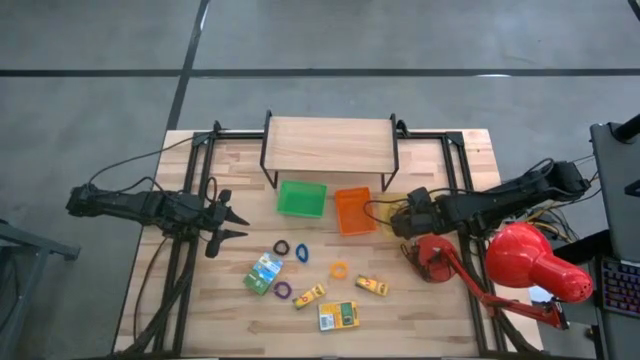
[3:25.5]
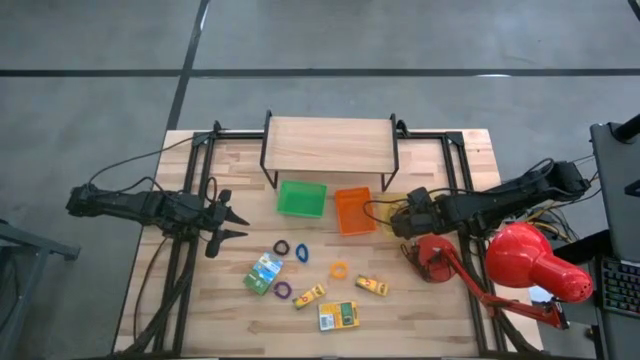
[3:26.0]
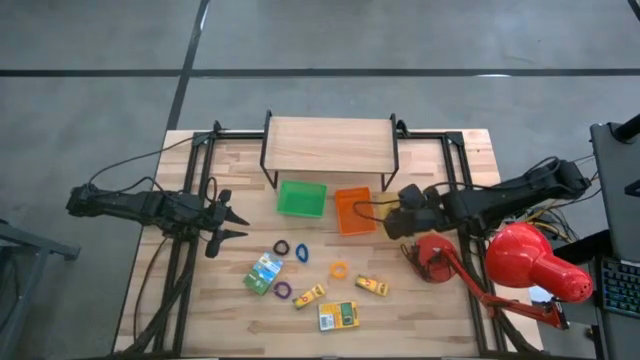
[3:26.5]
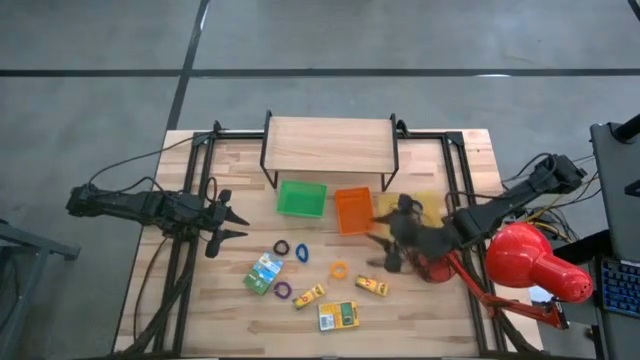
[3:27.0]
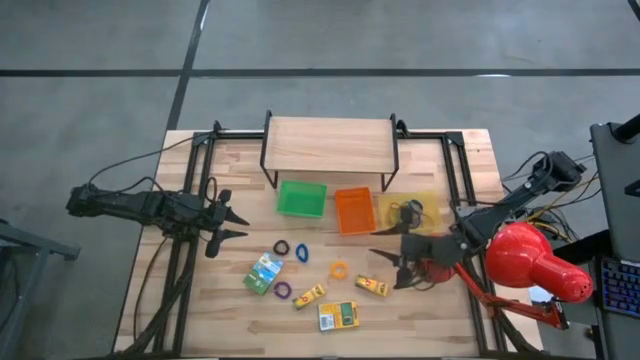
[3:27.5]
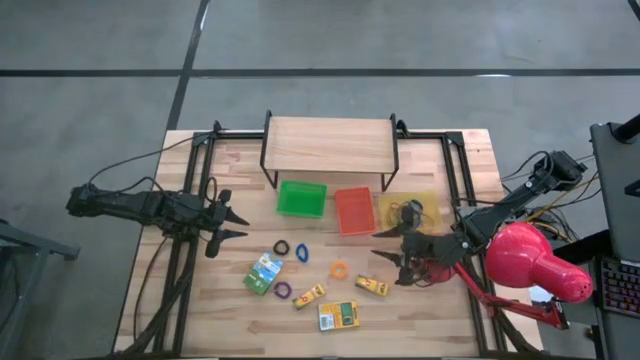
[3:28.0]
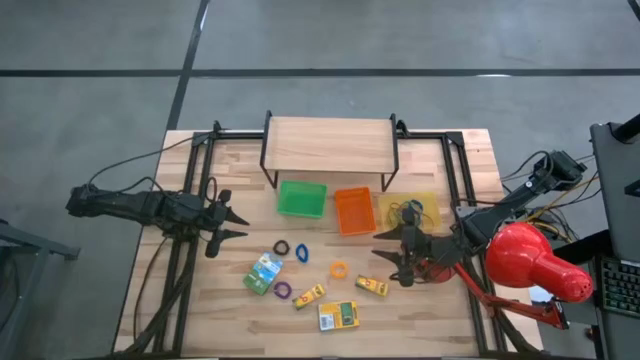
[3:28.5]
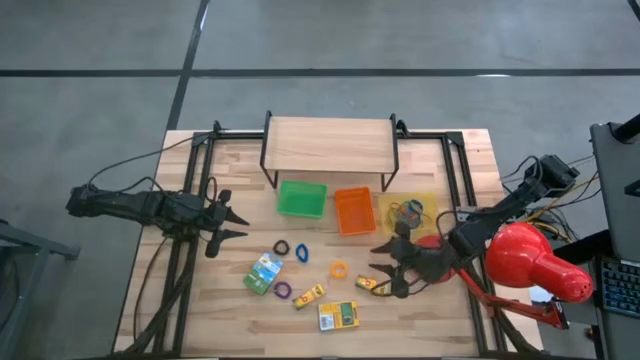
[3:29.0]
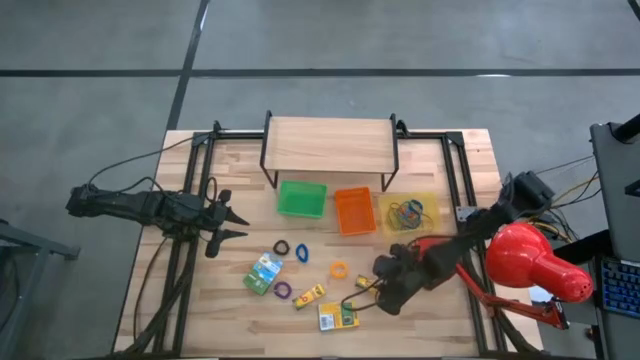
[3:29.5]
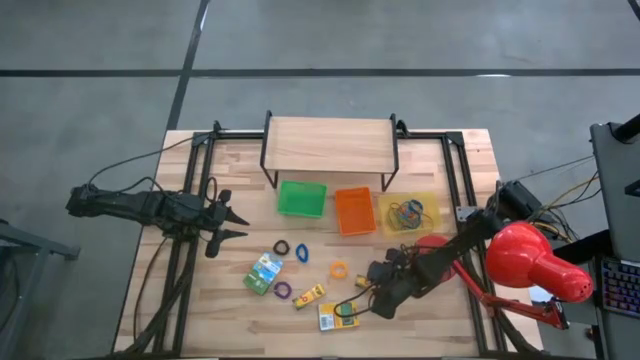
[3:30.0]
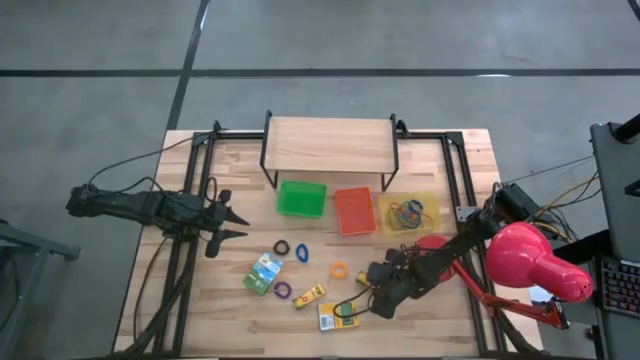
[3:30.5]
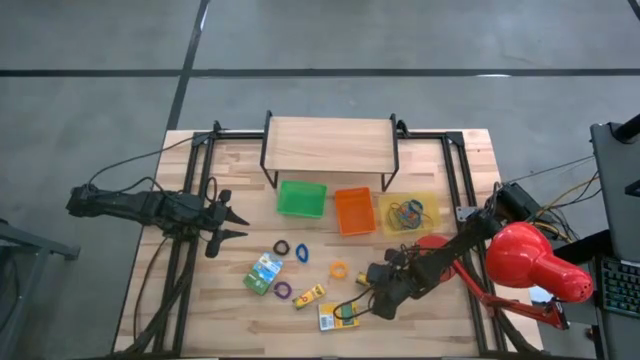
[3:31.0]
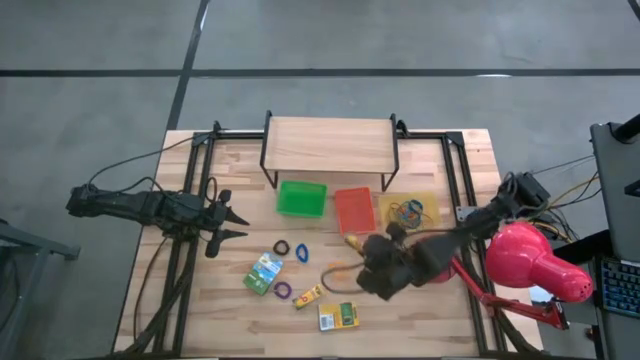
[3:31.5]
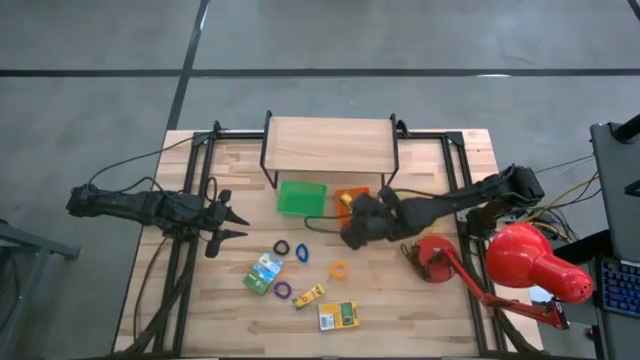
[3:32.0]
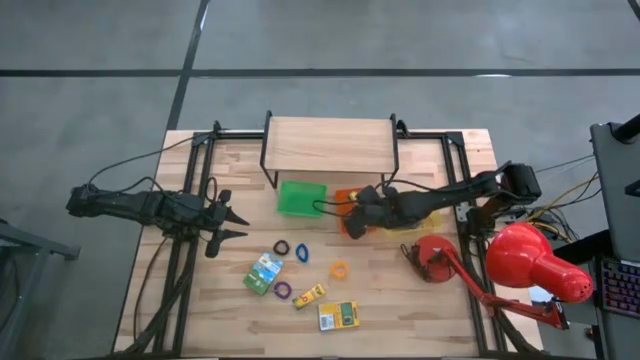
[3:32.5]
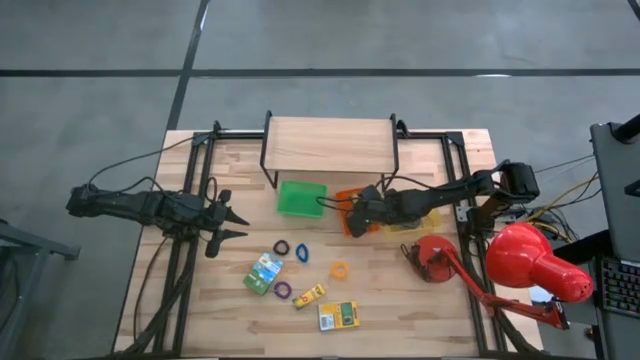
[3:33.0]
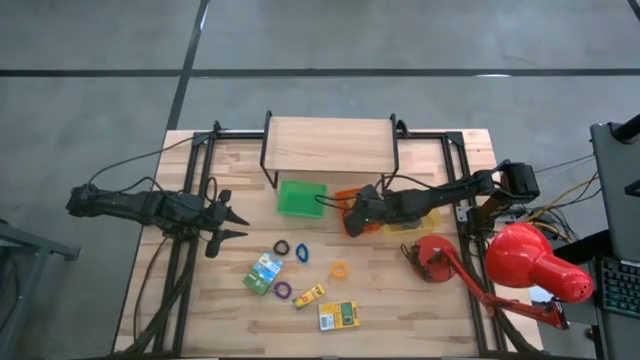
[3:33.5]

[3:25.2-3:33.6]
Task: Pick & Place Office Desk Supplies
Put the right small crayon box into the orange bin

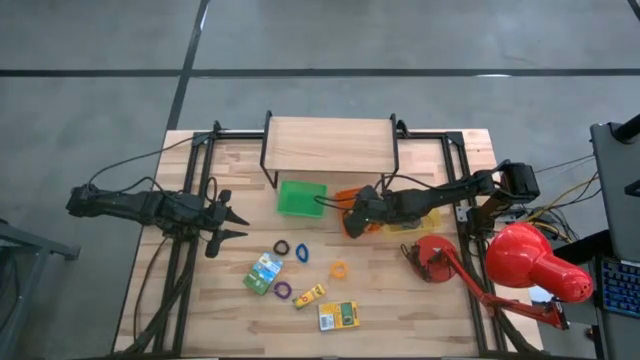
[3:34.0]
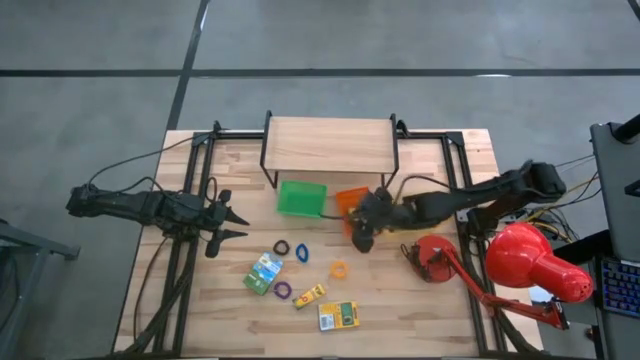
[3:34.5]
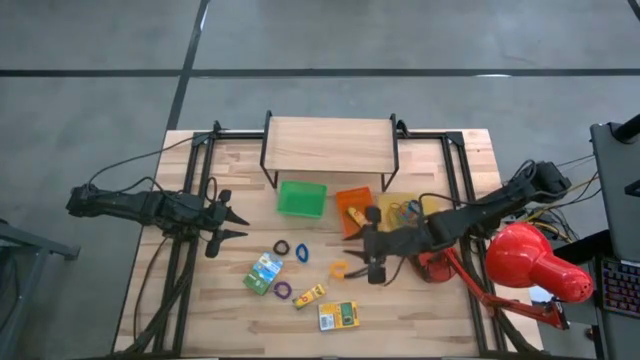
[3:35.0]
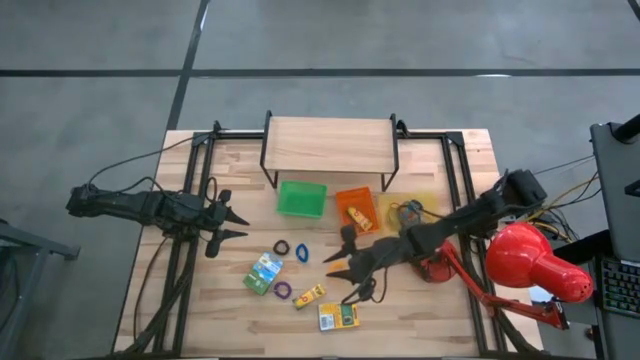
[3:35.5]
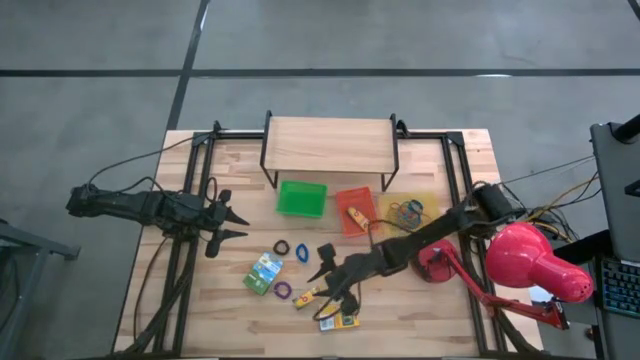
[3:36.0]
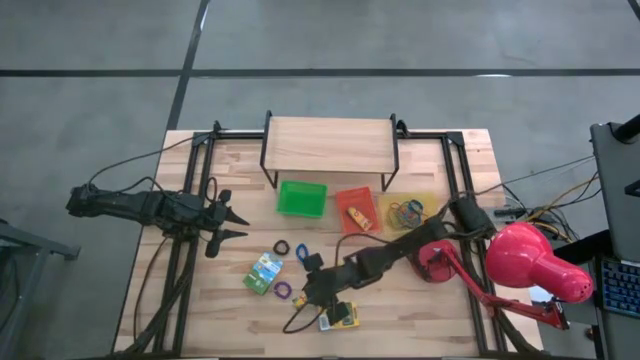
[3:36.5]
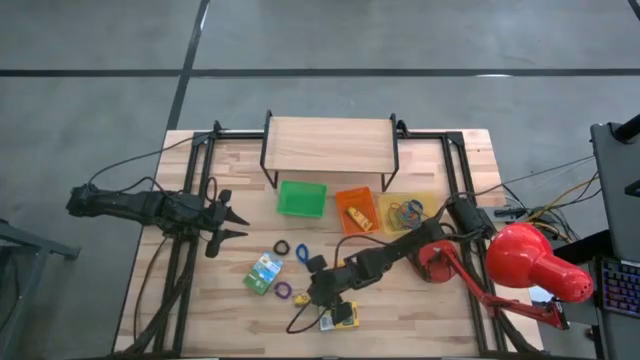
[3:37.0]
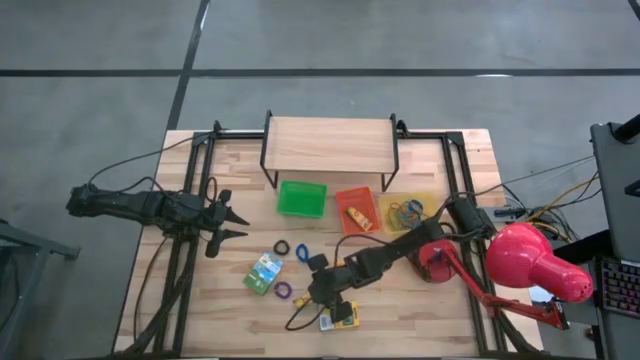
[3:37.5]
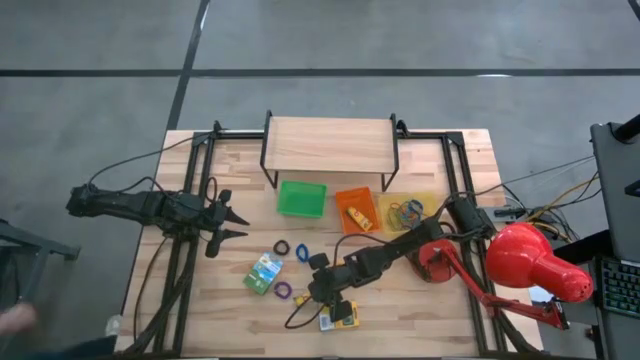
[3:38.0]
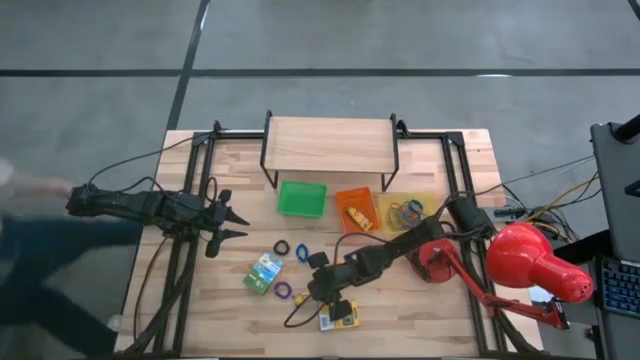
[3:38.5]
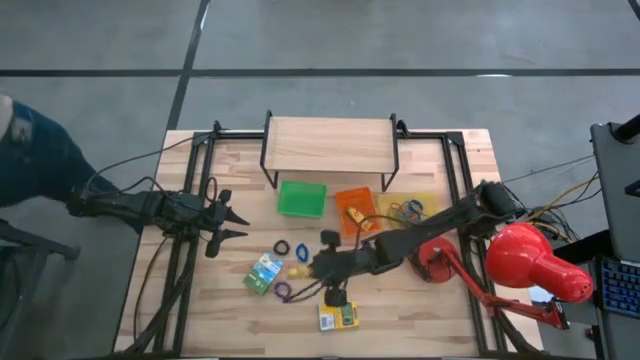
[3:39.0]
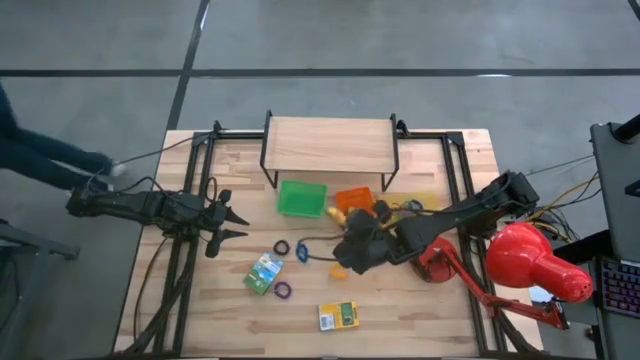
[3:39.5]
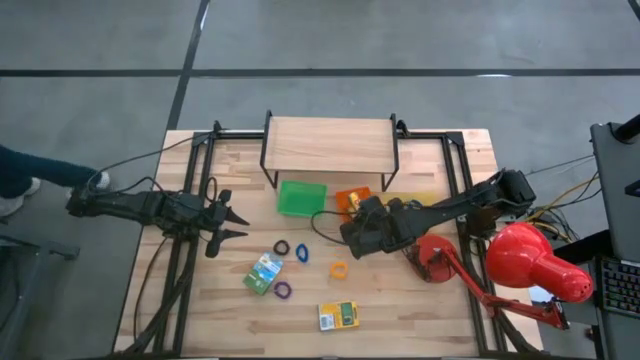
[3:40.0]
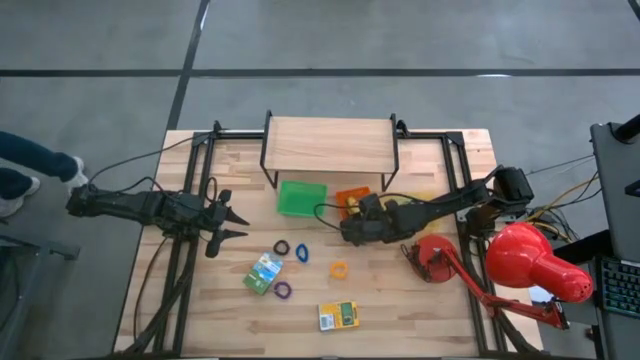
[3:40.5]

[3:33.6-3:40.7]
Put the small crayon box into the orange bin

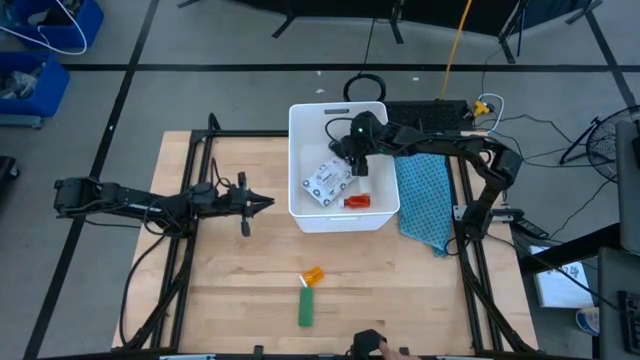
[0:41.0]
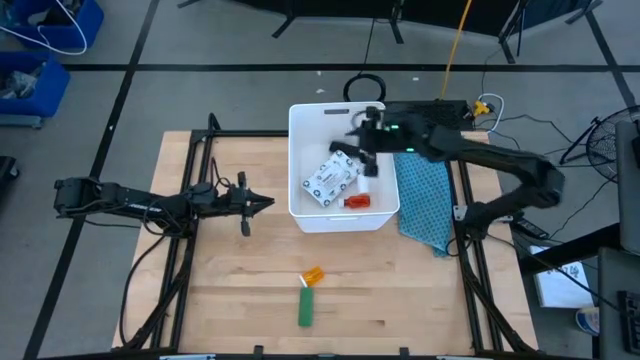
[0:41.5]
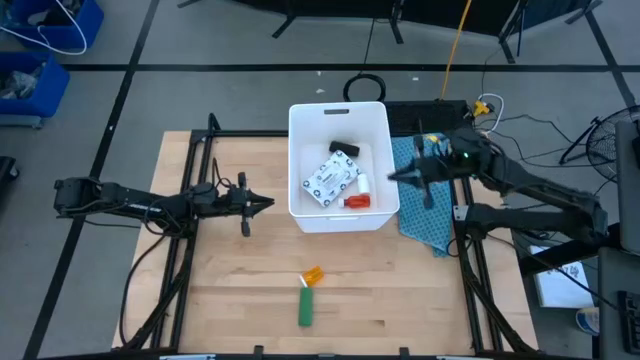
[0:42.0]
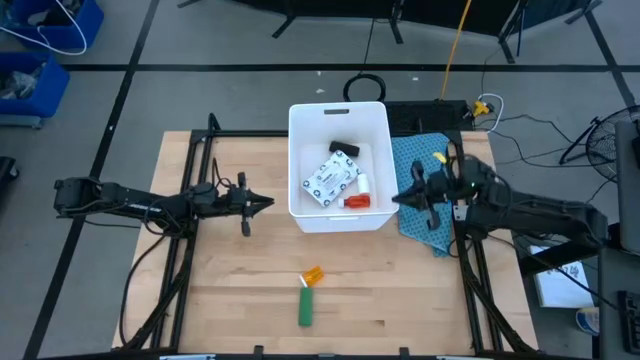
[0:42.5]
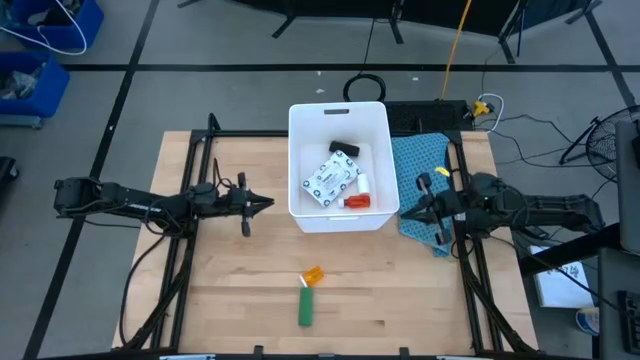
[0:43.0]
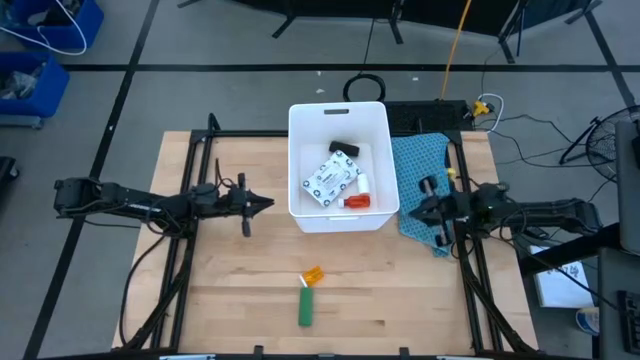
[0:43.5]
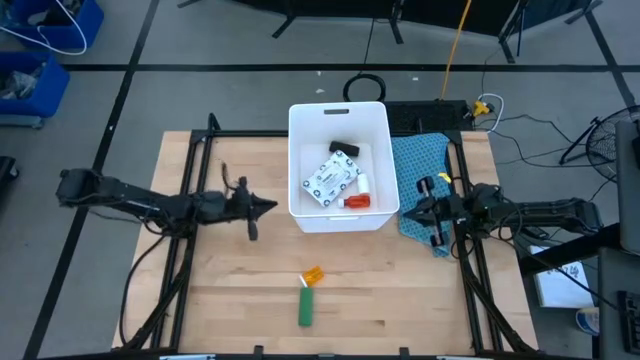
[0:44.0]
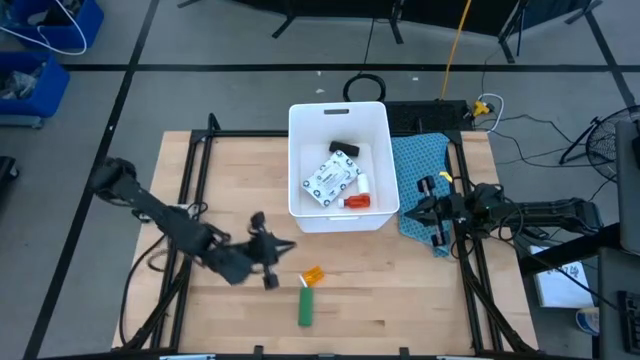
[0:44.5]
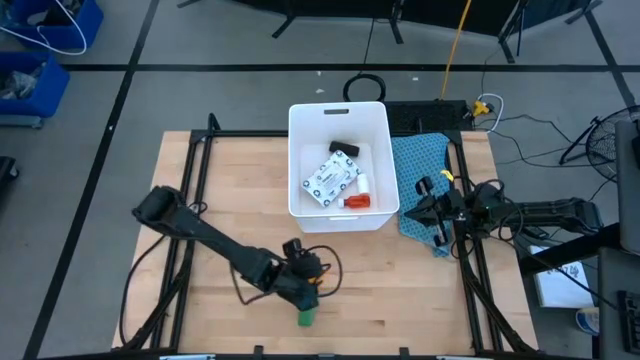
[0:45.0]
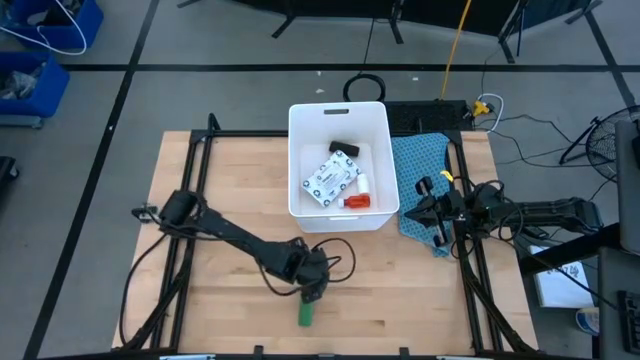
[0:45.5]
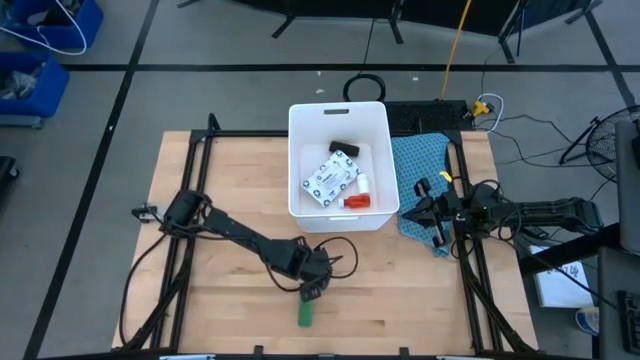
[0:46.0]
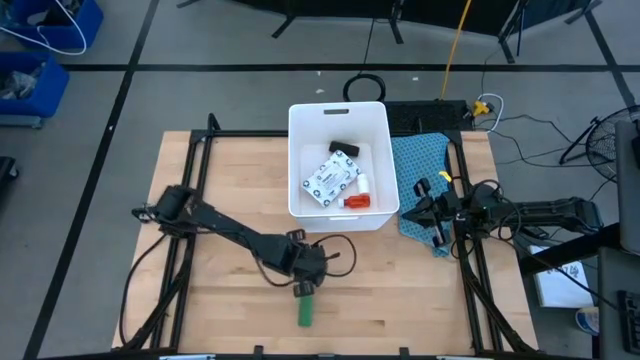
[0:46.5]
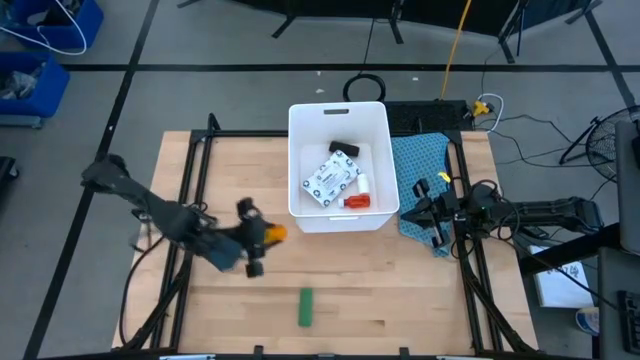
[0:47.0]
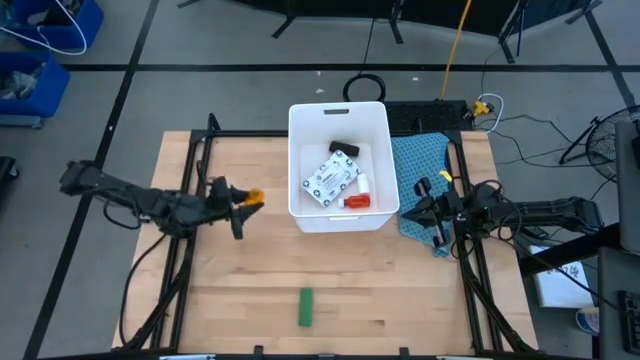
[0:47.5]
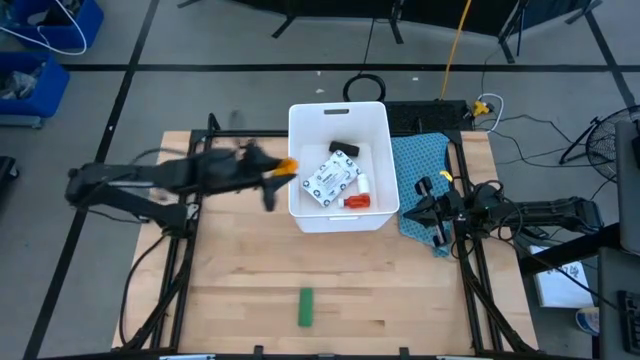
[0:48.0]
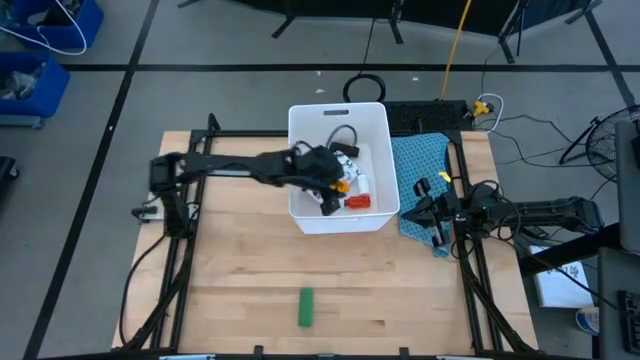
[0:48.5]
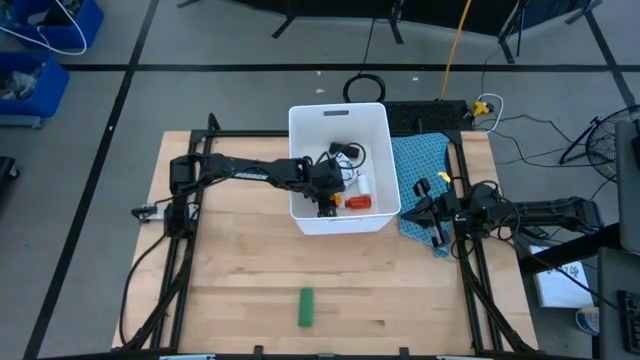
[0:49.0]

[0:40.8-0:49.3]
Task: Pick & place medical supplies in basket/bin
Put the orange medicine bottle into the white bin
